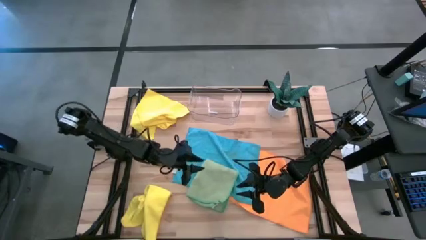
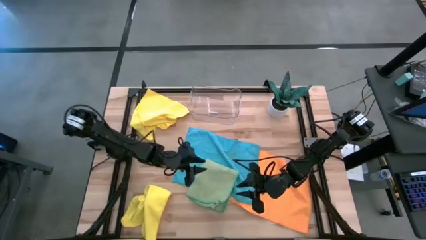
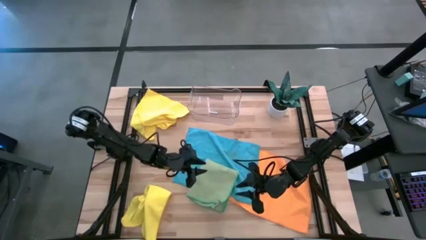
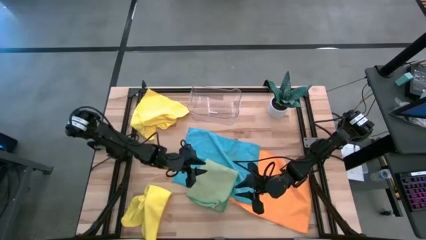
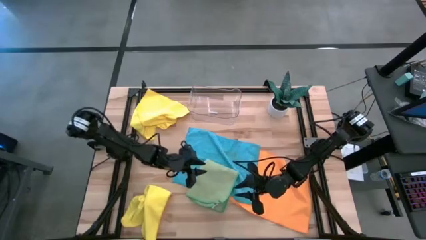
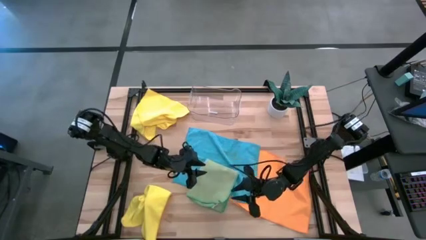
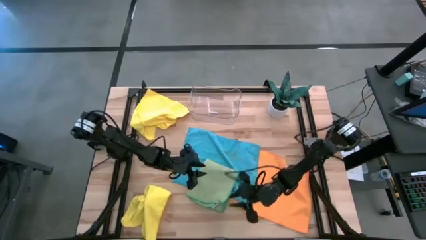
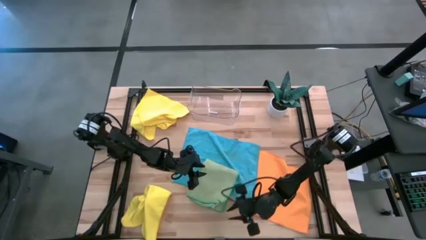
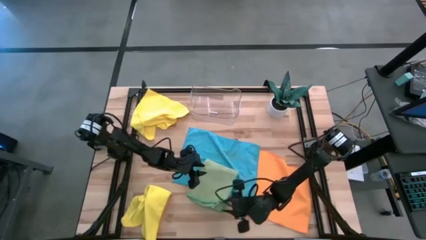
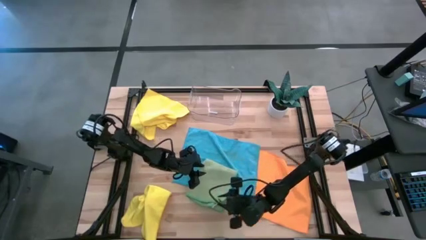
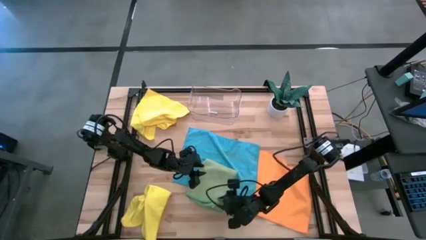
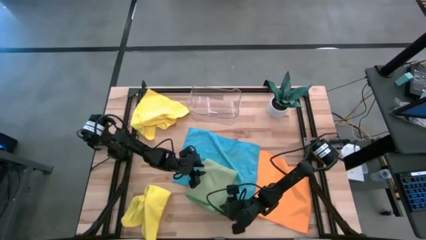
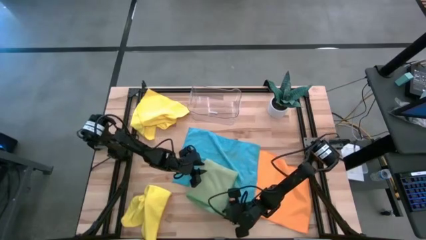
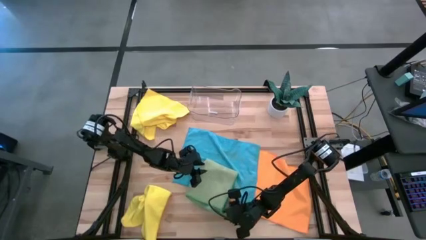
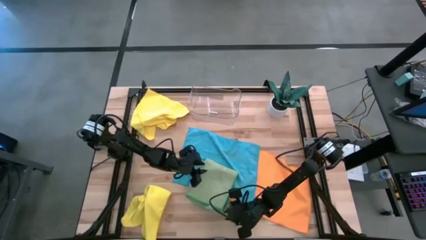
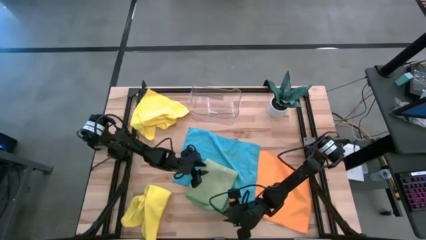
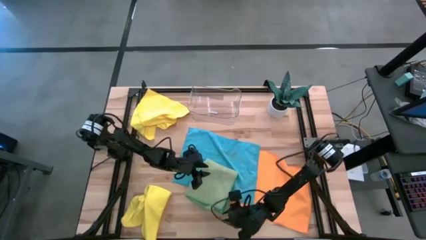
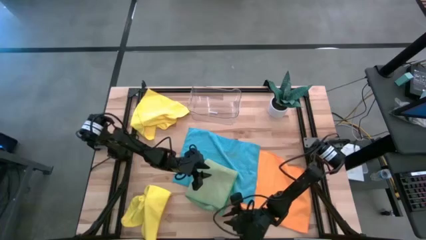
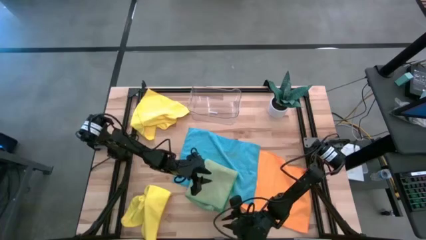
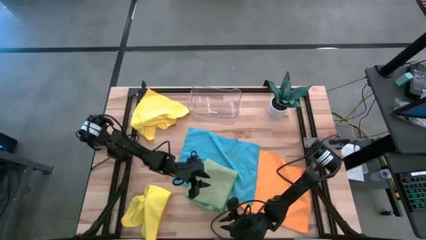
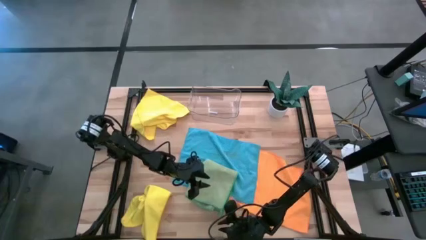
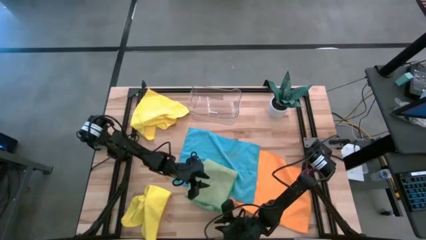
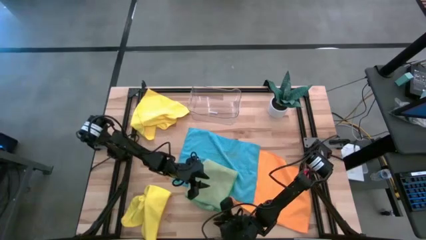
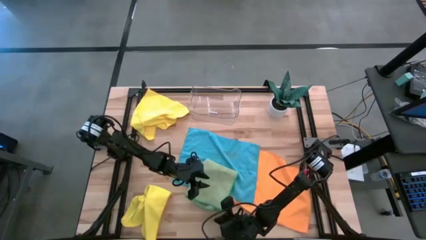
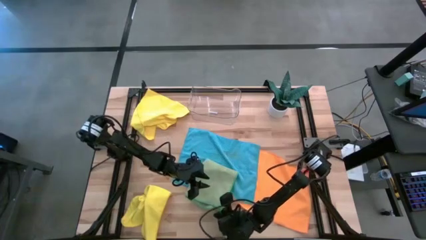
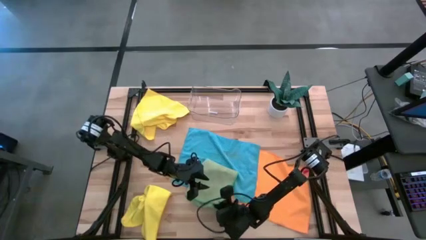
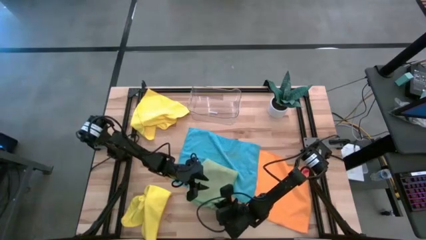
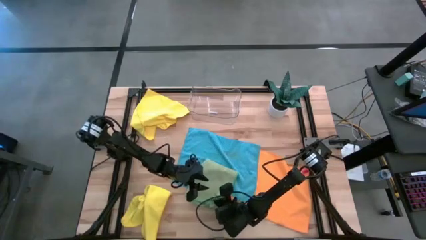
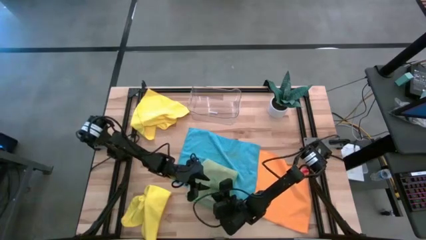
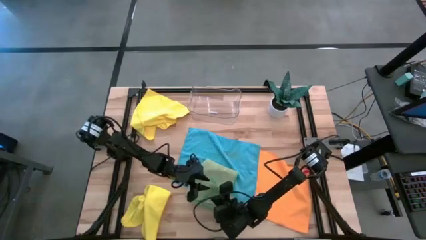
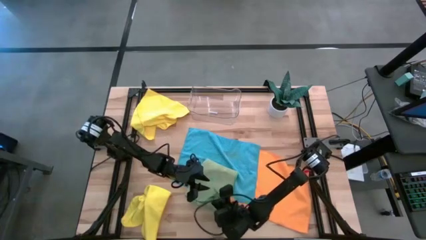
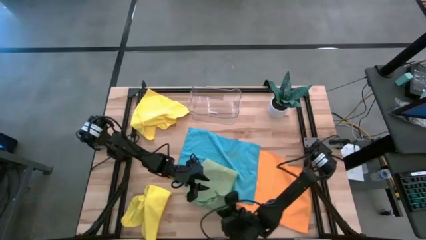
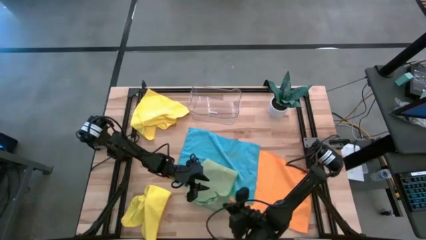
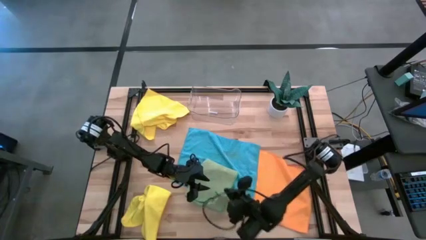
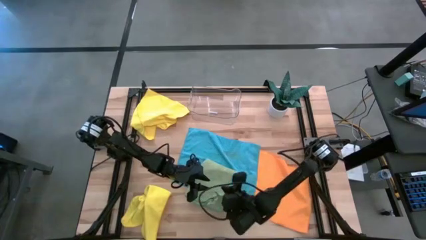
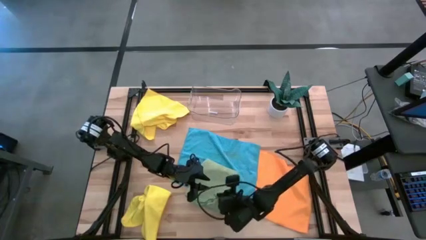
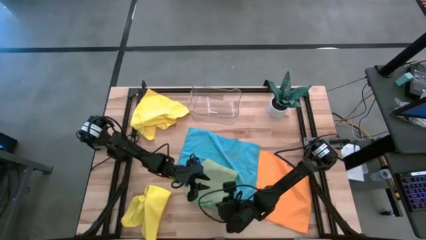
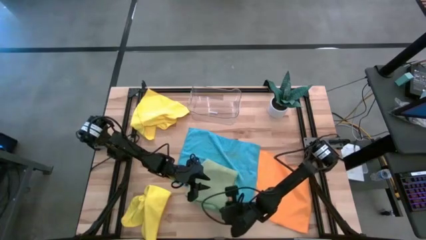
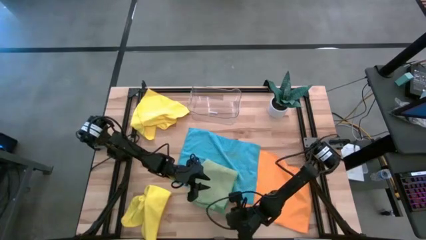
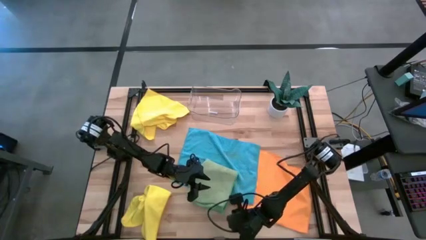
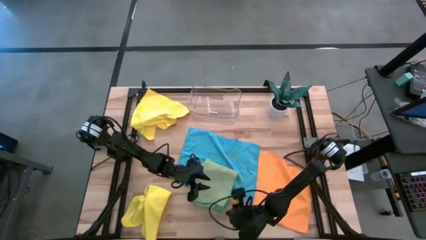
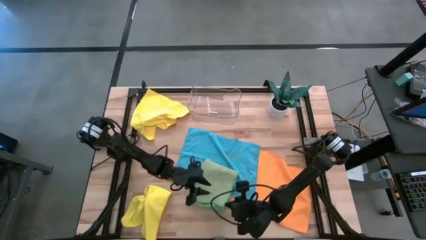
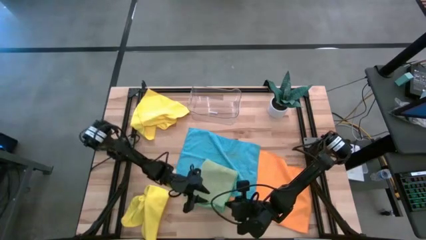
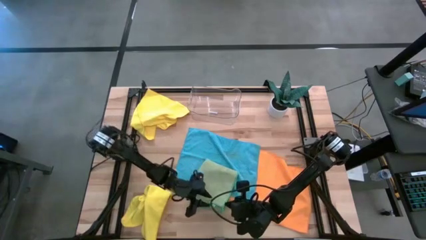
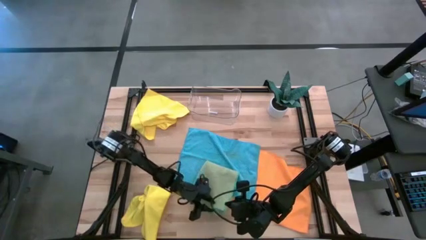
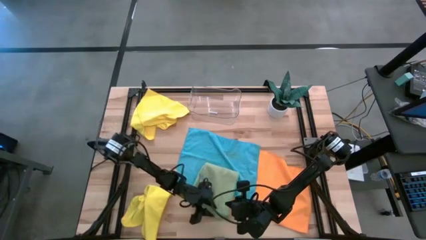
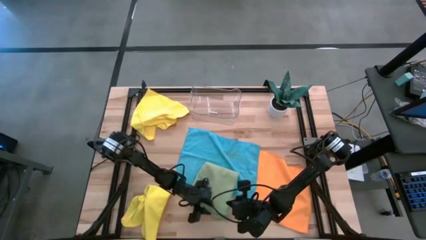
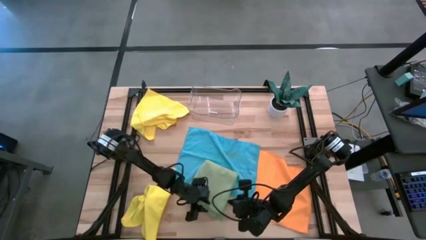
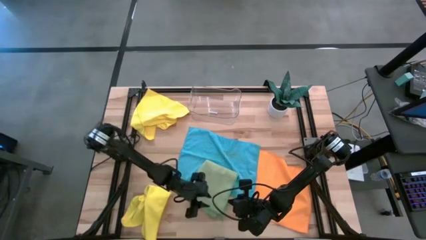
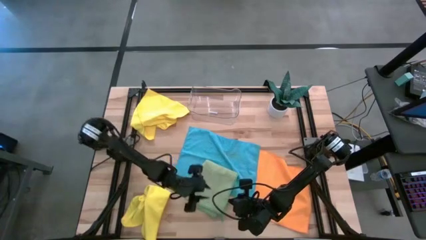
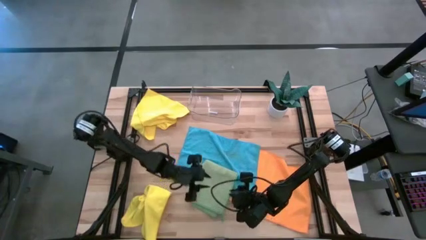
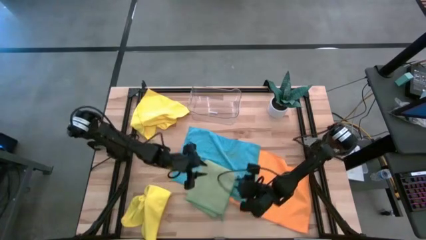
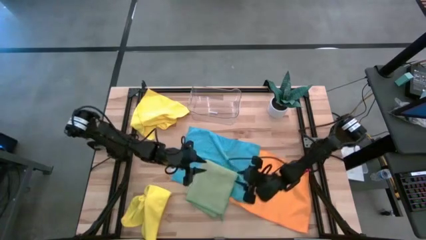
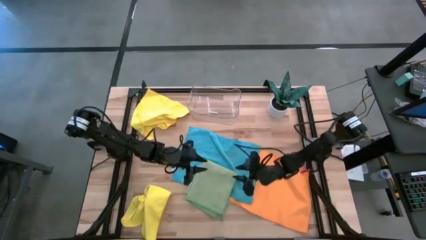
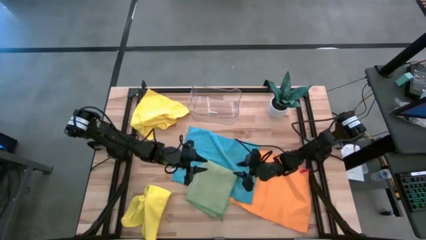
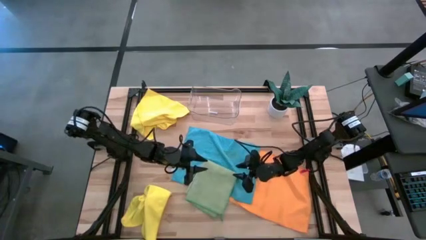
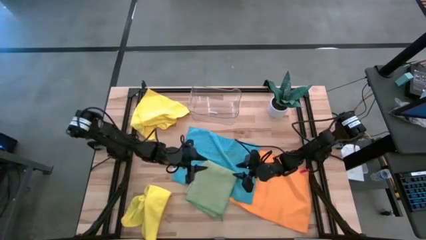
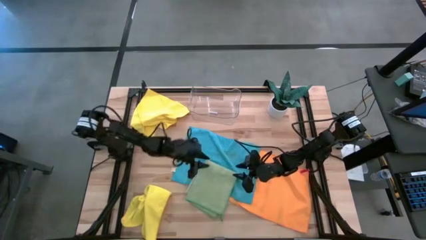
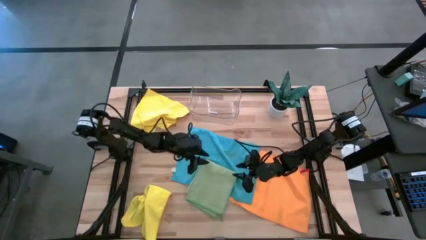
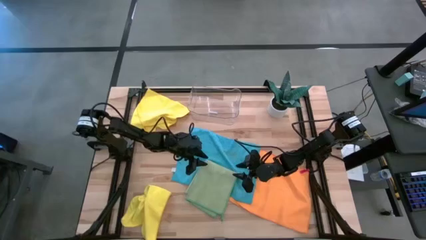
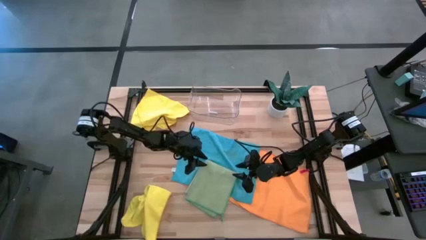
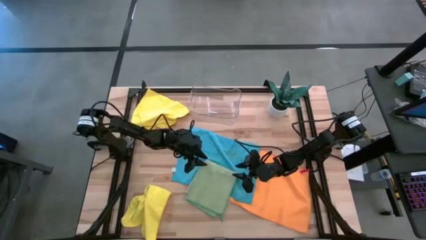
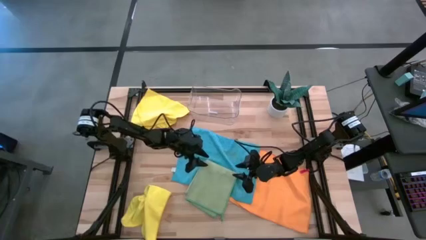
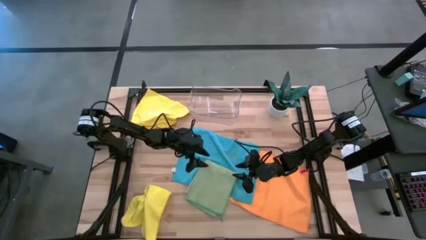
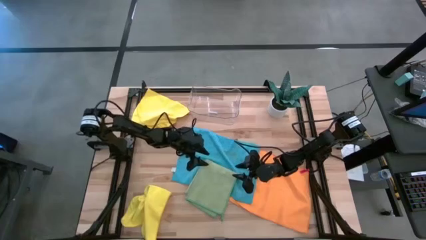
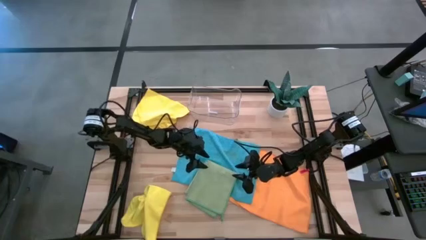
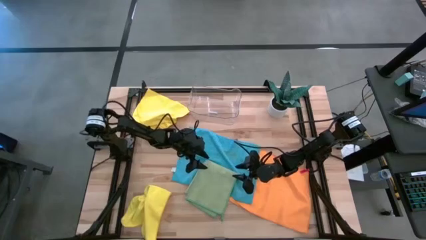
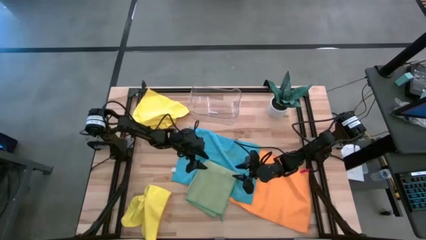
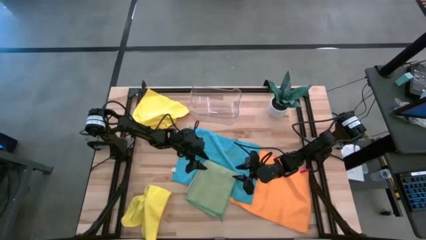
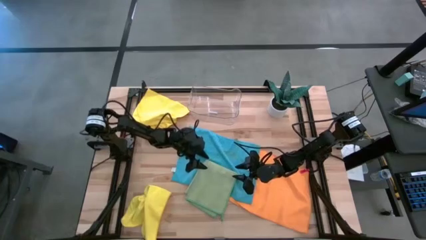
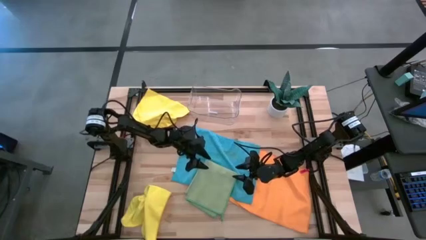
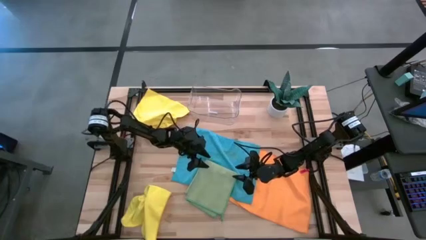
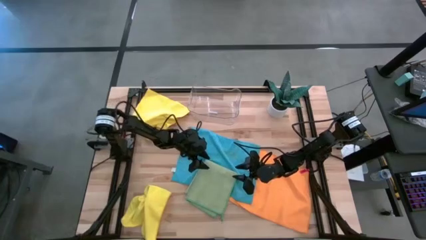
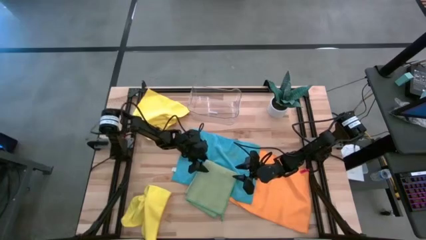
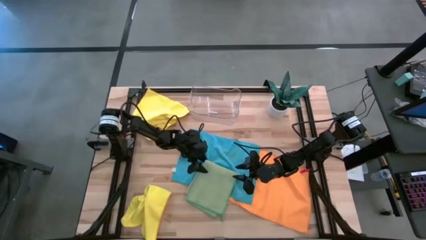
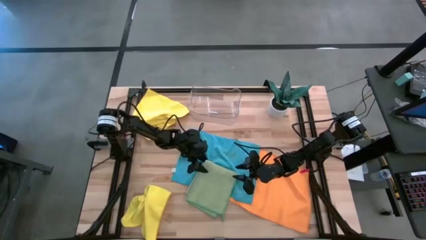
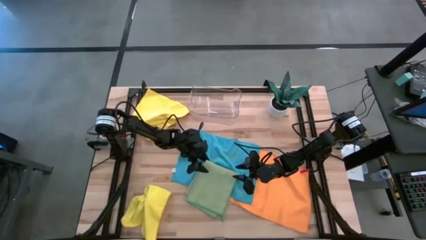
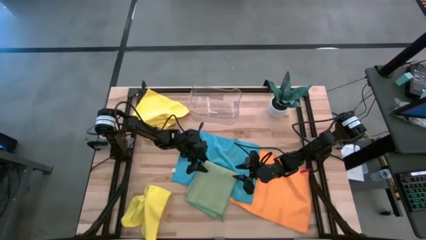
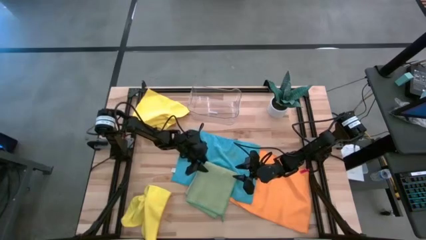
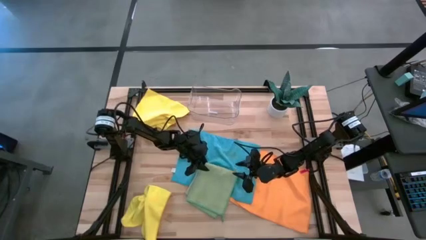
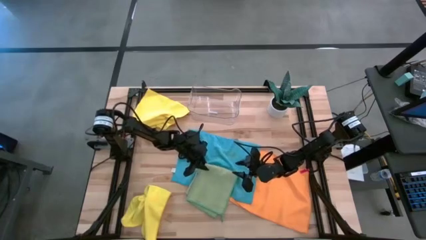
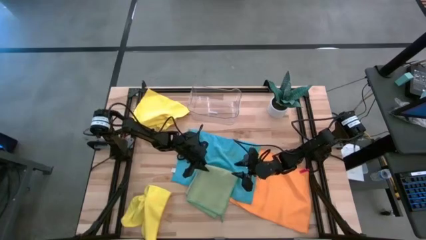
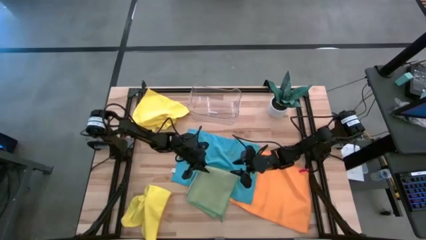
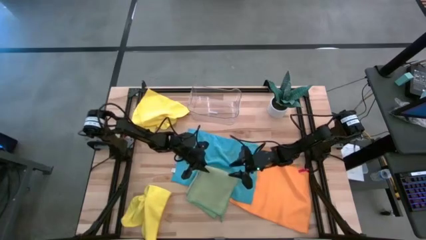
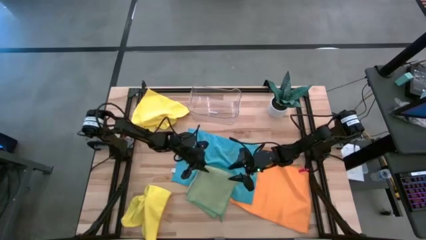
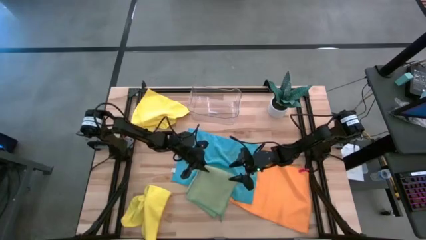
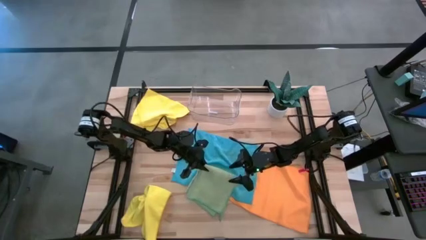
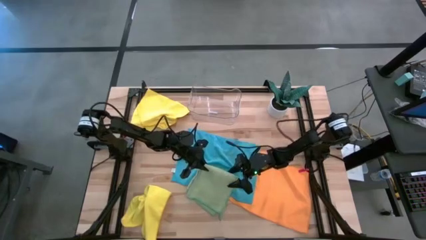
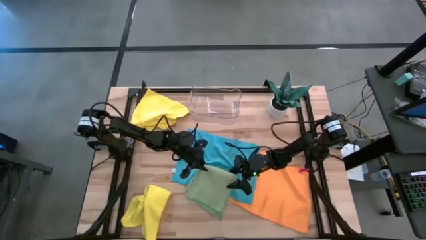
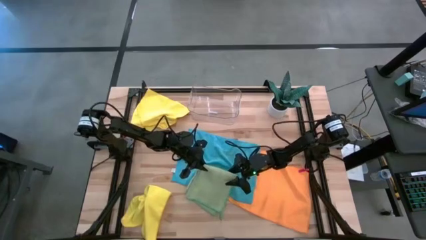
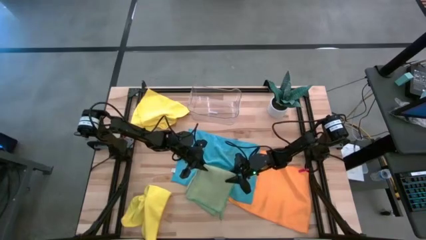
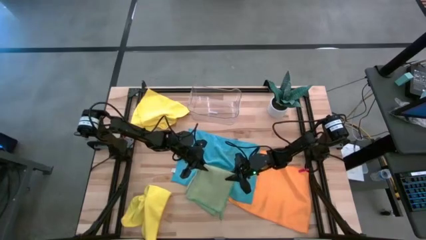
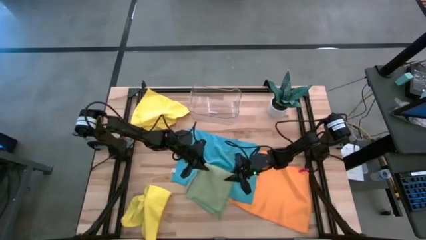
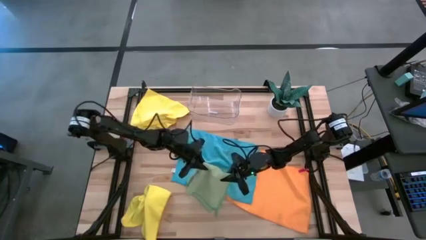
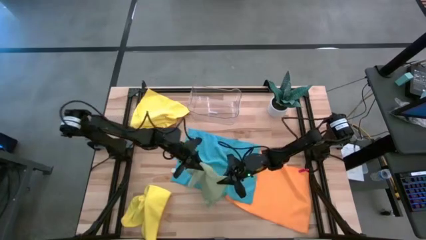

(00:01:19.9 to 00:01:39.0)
Task: Fold microfiber towels
Fold the green towel
